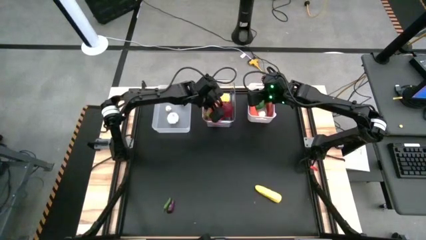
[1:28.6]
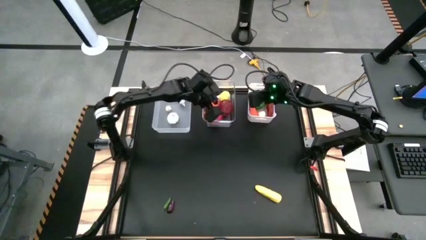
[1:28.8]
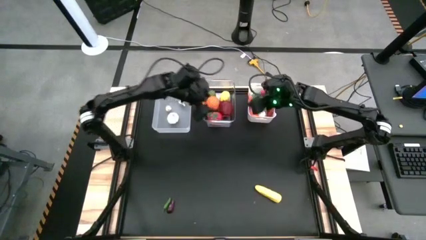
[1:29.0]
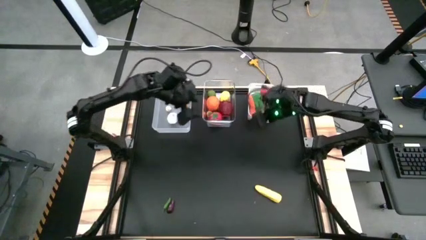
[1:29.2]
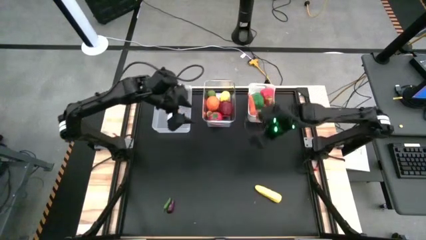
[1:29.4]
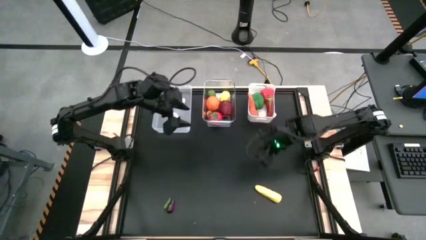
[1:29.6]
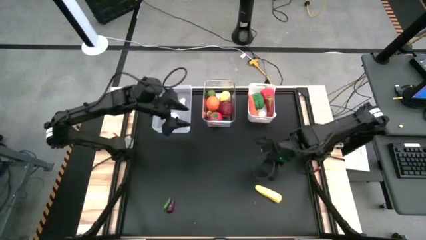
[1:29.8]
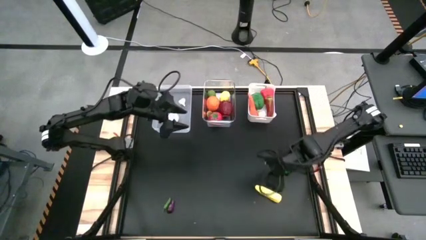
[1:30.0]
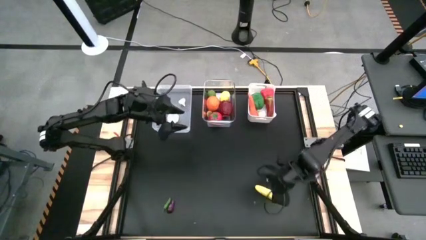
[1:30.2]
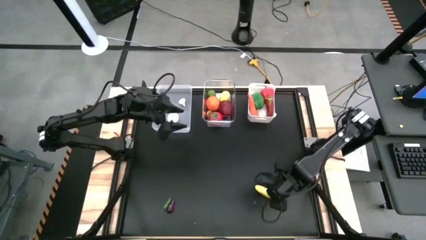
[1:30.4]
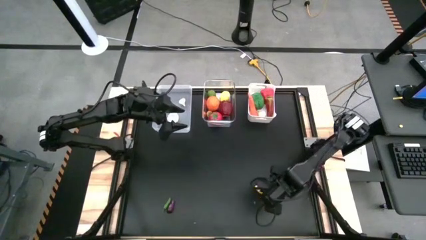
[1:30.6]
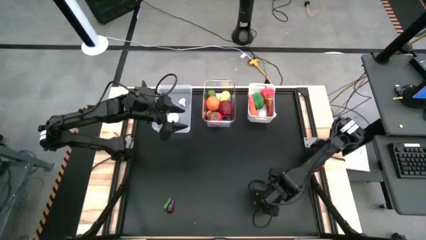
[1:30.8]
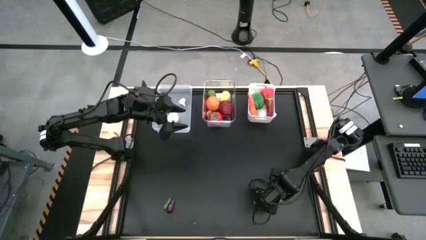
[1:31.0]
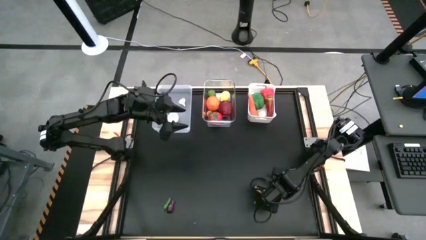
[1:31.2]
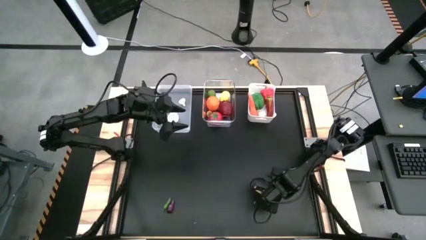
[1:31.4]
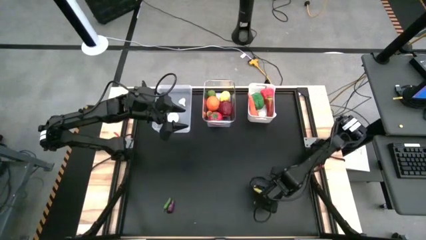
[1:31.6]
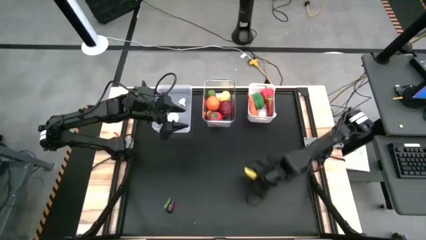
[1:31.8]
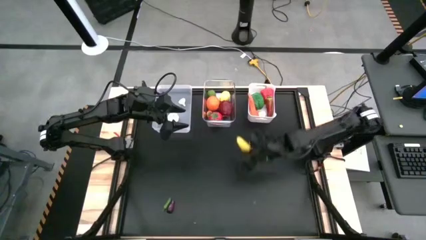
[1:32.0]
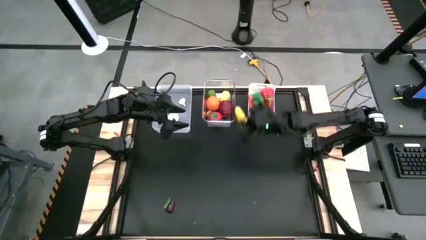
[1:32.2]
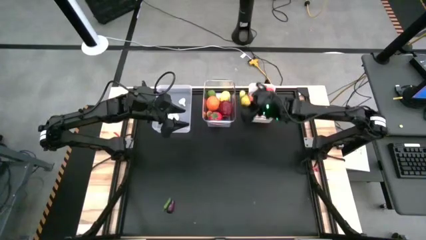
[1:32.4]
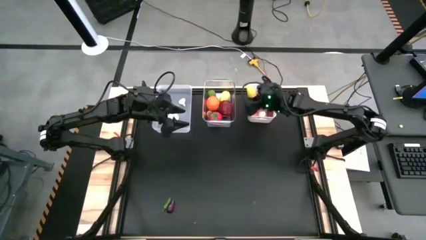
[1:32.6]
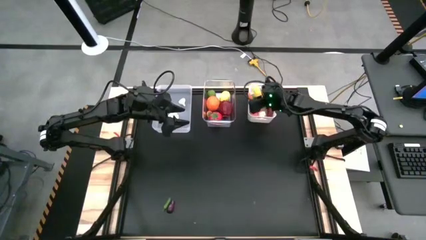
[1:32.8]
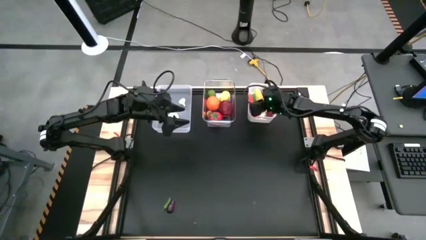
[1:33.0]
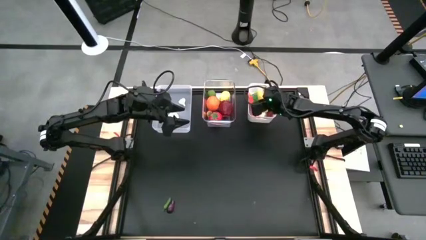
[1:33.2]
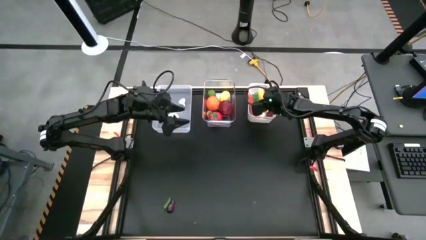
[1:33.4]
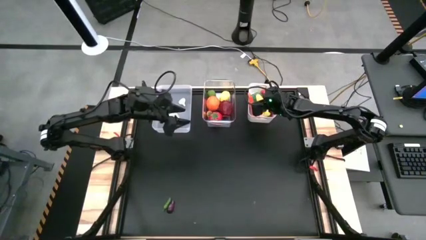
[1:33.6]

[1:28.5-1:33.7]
Task: Sort produce into baskets
Put the yellow corn into the white bin

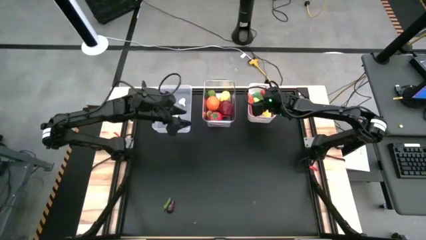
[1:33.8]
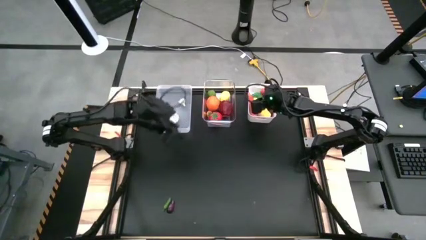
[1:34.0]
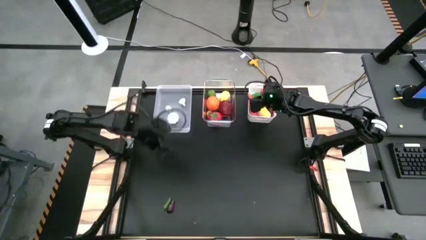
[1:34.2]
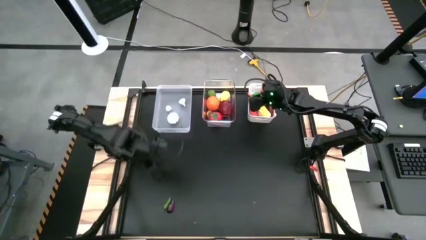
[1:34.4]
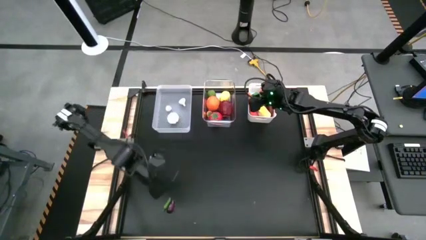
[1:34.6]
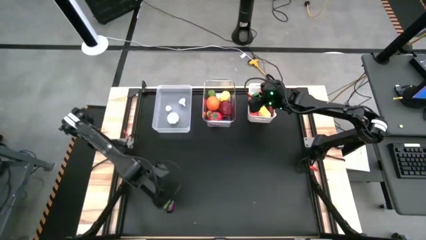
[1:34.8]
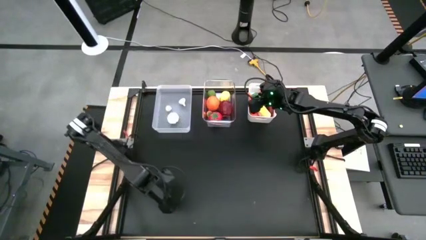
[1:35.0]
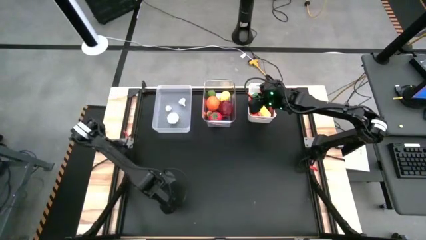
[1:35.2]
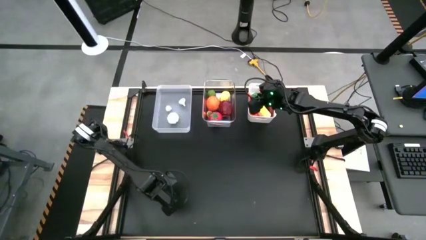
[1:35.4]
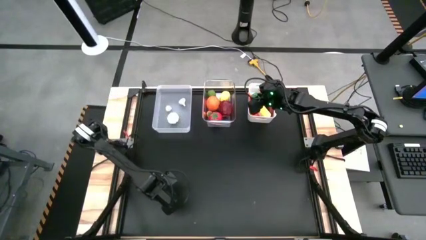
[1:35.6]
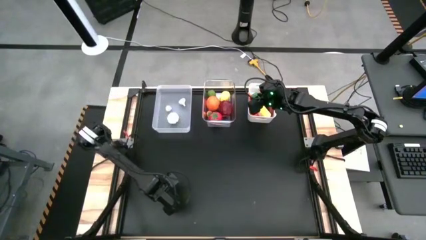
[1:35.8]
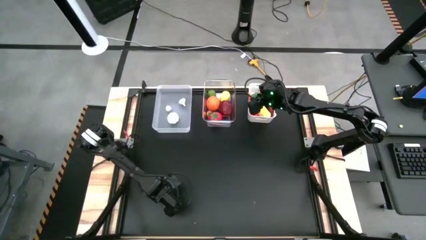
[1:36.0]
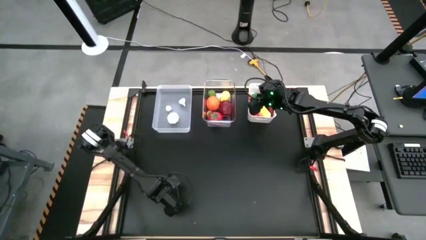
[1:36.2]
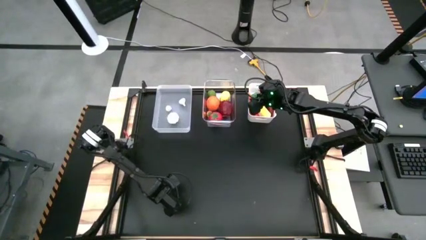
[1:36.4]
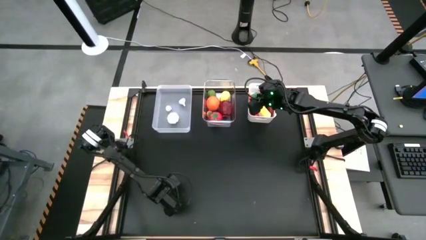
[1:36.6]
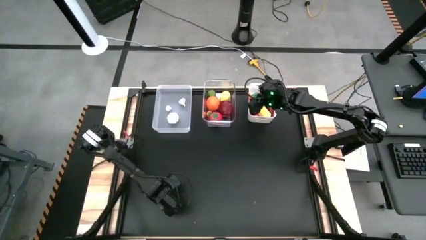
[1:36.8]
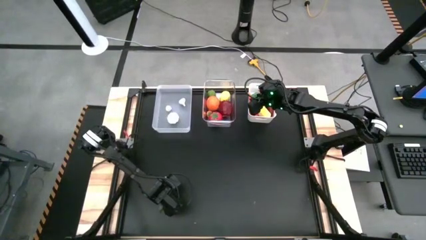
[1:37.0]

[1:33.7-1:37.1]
Put the green chili into the left transparent bin

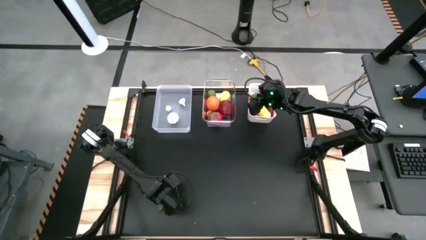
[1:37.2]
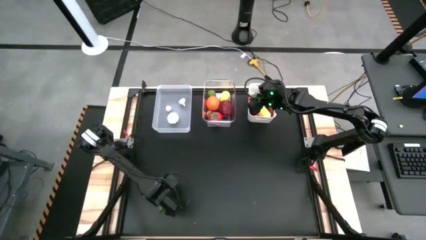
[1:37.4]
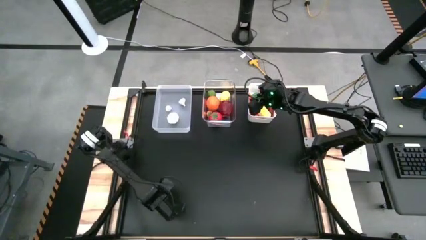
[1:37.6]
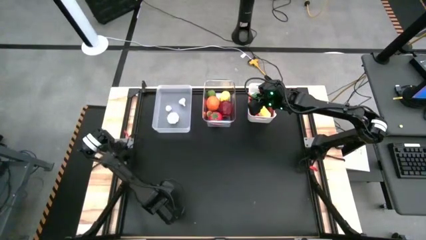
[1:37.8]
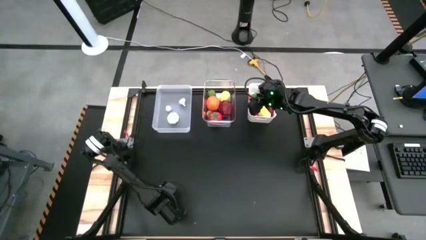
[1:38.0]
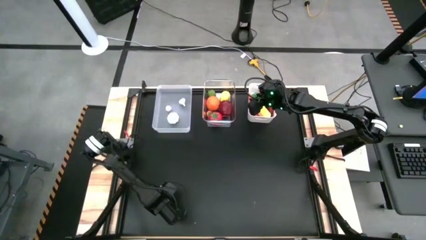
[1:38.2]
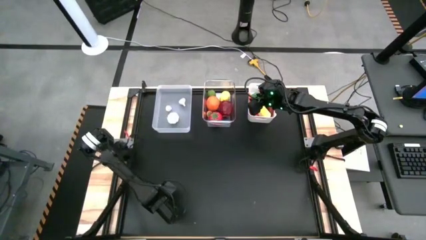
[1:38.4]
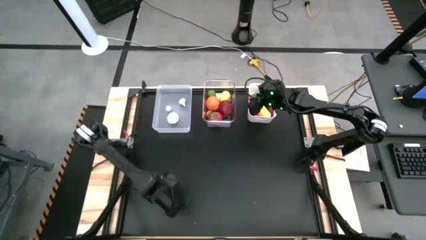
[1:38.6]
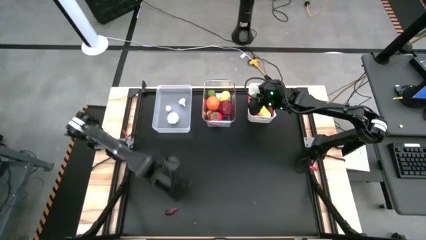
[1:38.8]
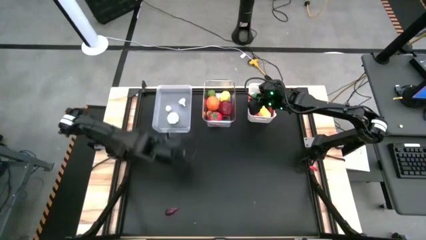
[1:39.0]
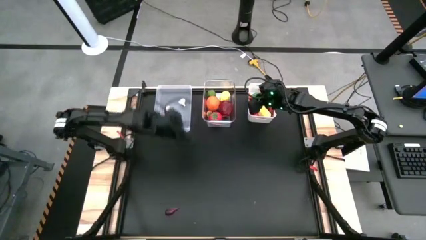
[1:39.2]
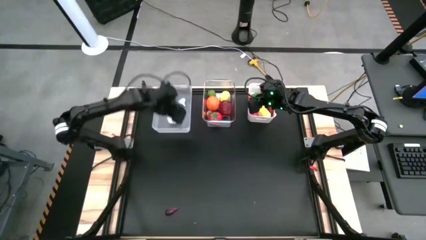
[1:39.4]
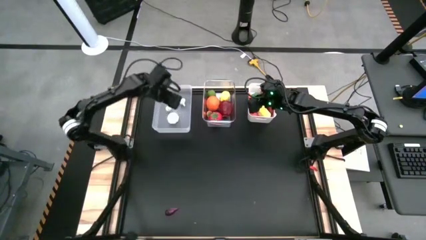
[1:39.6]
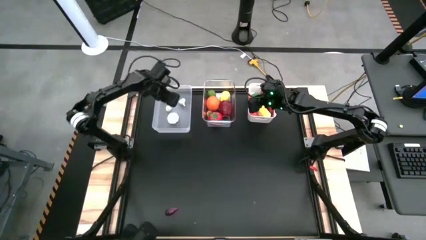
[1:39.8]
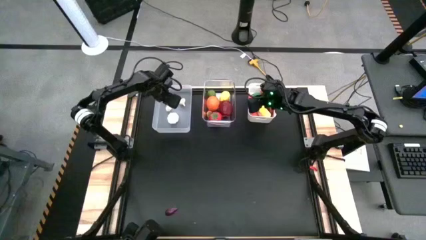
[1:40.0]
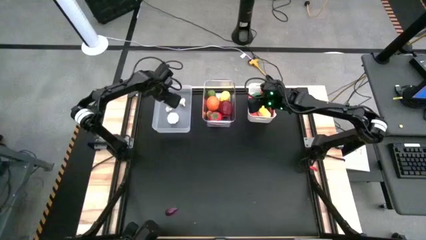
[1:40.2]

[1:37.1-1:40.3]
Put the green chili into the left transparent bin

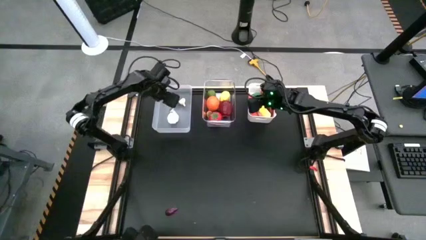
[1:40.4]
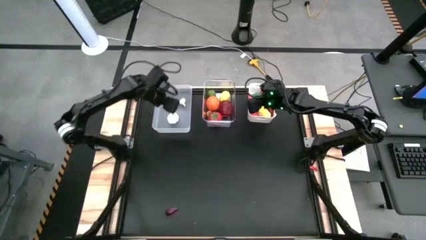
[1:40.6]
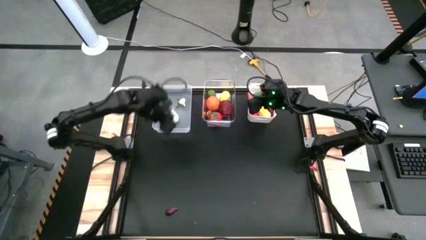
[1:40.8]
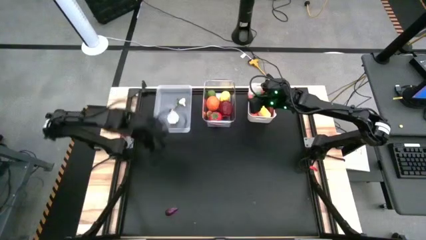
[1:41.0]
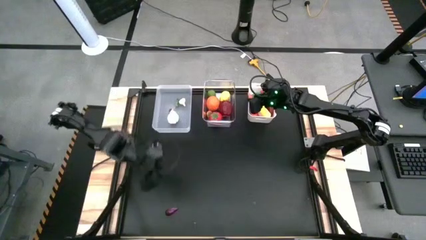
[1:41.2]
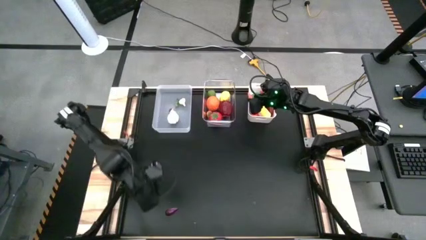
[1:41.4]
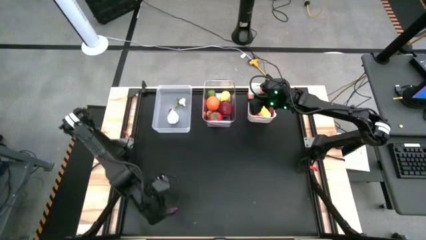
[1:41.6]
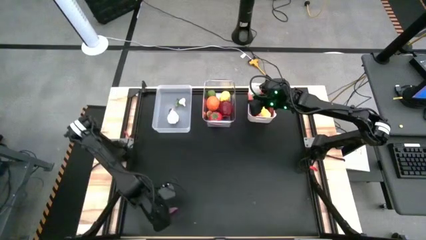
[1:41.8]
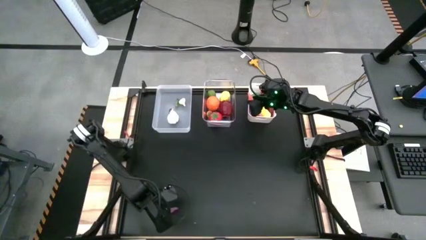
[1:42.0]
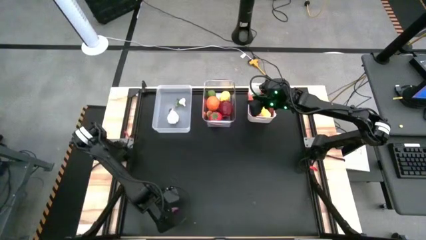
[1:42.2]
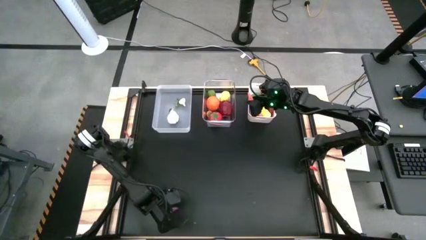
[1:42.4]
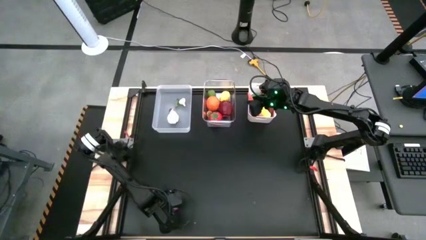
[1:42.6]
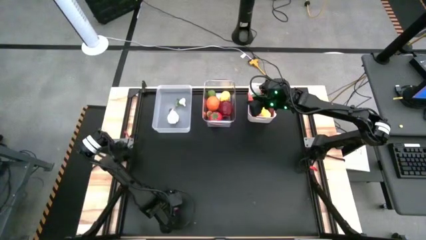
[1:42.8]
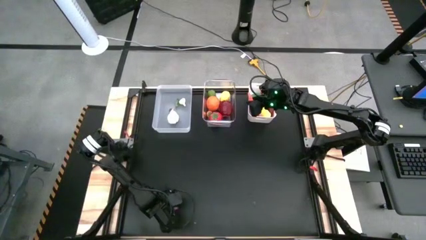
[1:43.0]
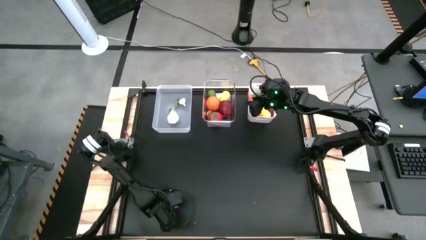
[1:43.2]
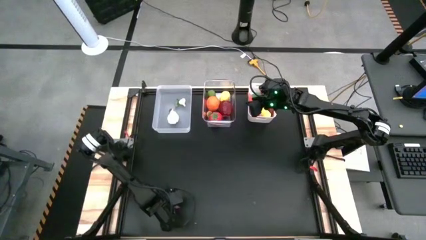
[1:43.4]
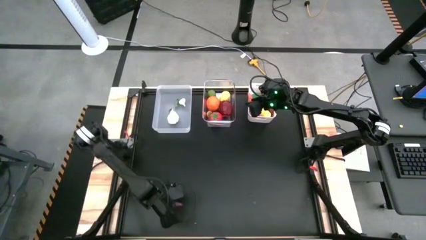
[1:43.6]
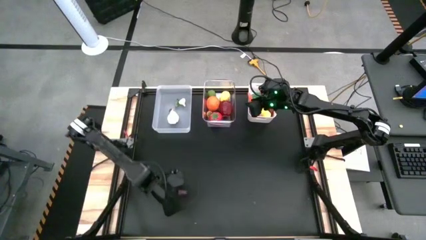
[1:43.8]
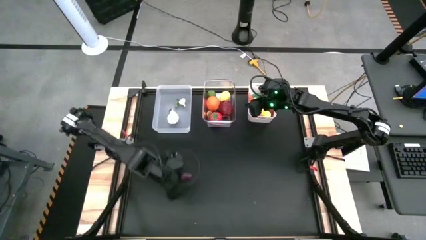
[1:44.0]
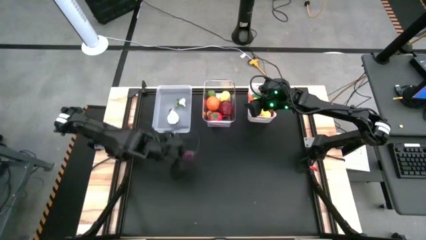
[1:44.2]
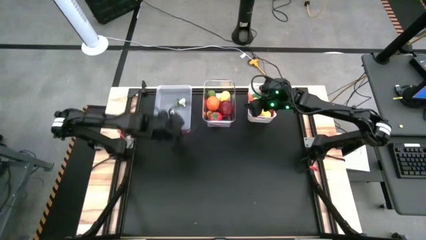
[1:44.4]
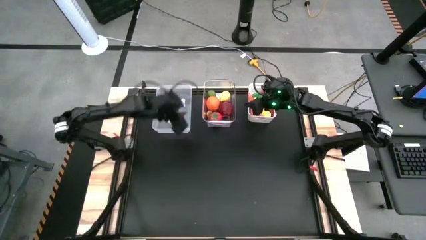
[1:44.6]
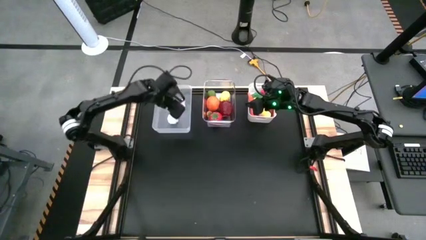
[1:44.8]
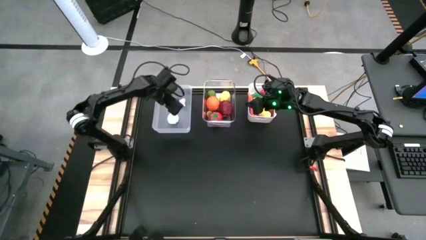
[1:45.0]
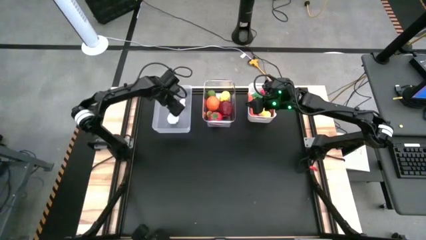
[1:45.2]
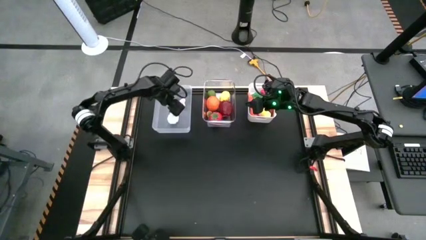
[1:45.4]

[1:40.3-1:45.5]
Put the violet eggplant into the left transparent bin
